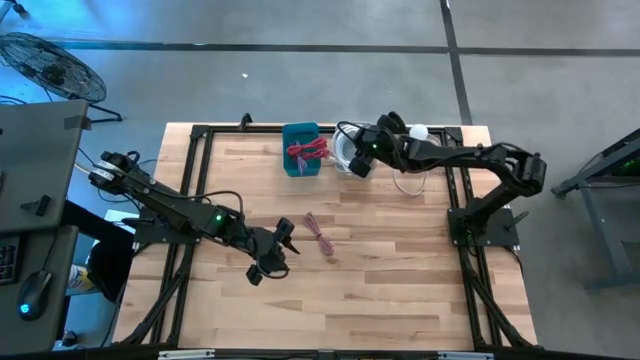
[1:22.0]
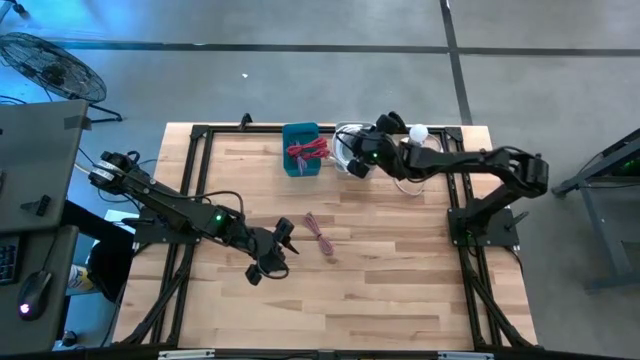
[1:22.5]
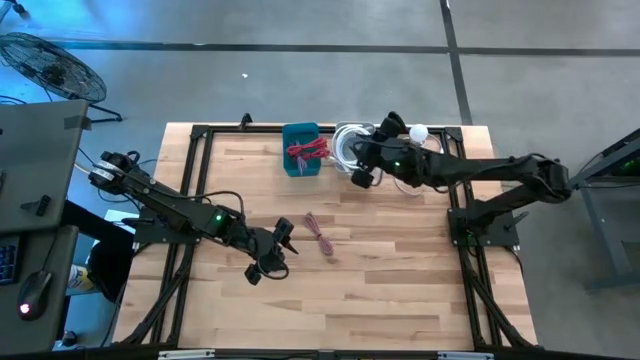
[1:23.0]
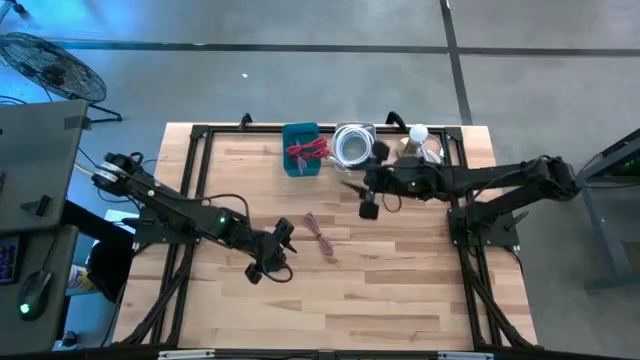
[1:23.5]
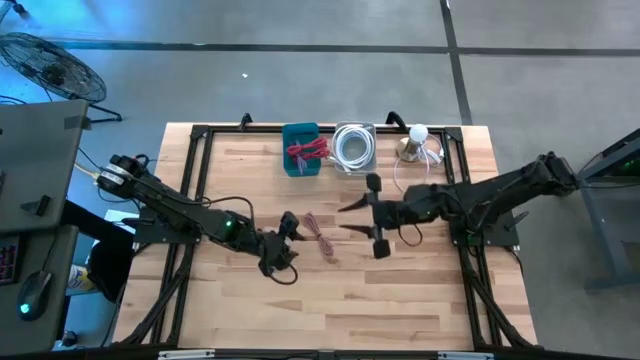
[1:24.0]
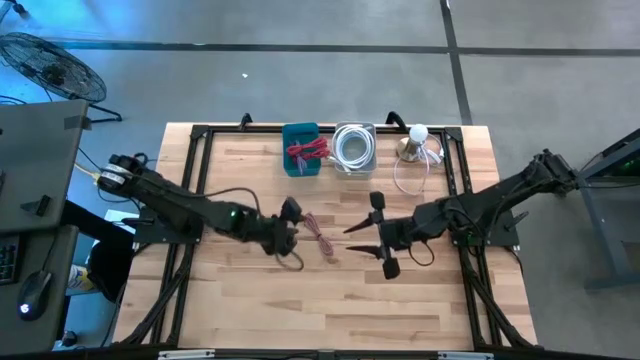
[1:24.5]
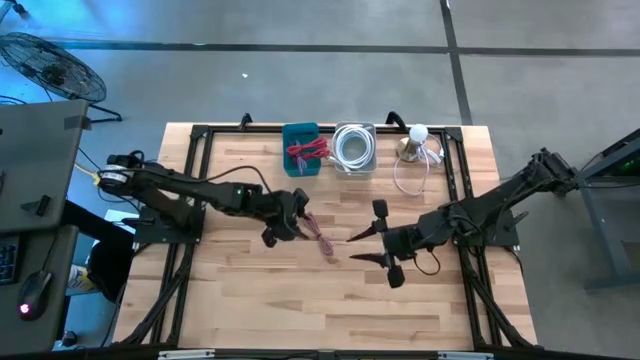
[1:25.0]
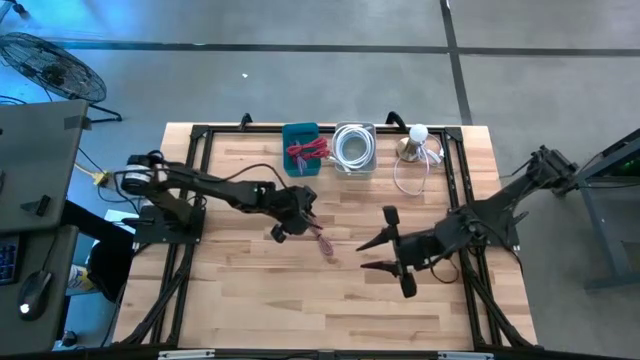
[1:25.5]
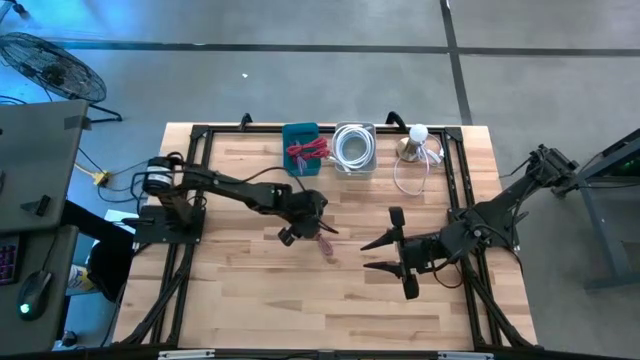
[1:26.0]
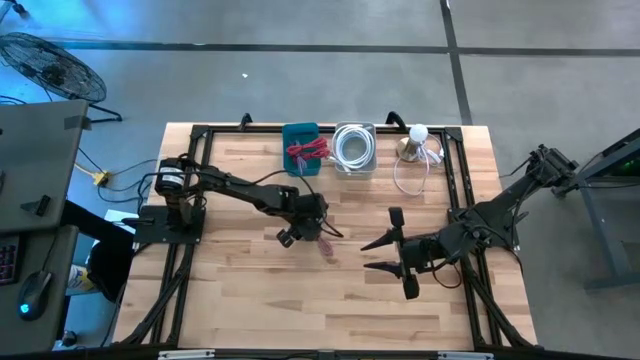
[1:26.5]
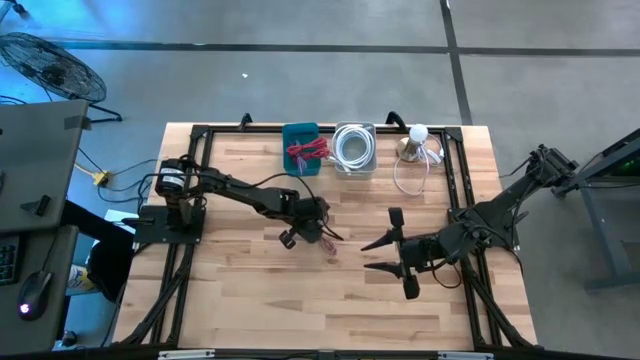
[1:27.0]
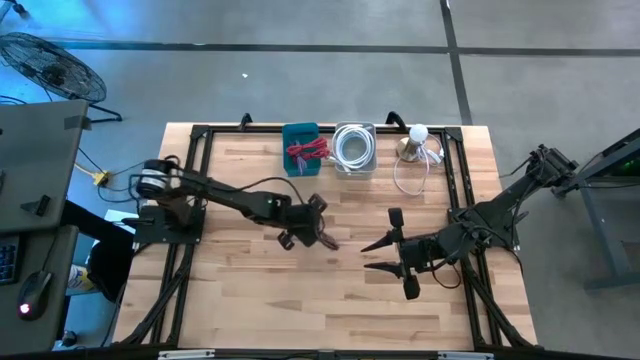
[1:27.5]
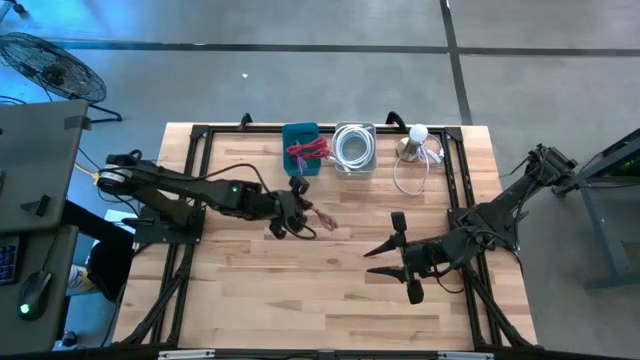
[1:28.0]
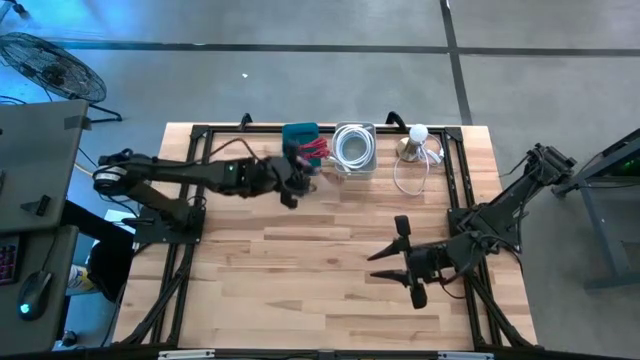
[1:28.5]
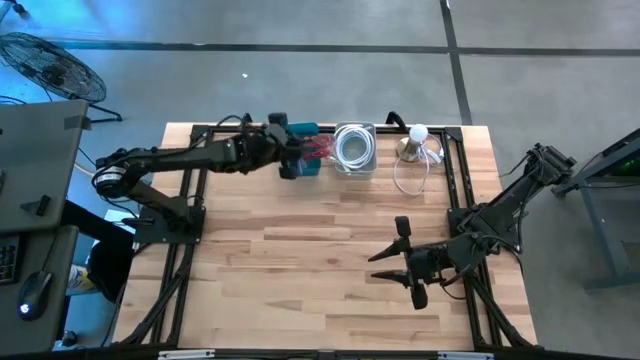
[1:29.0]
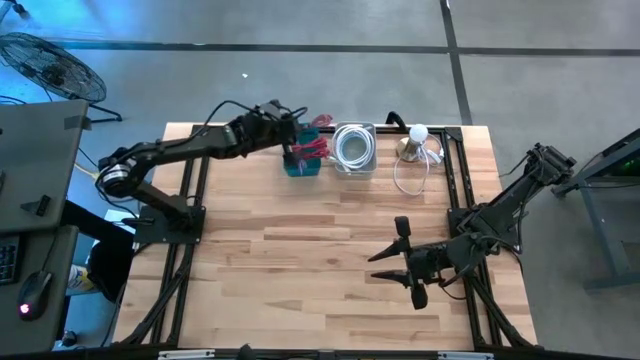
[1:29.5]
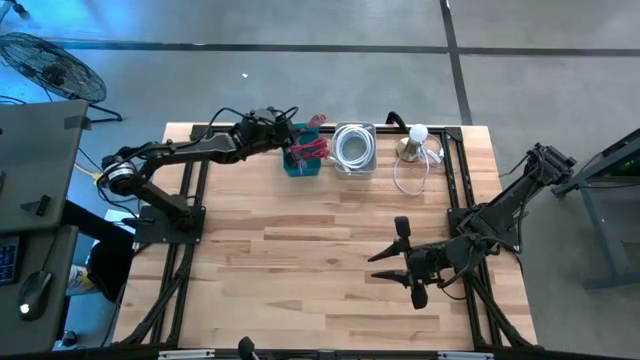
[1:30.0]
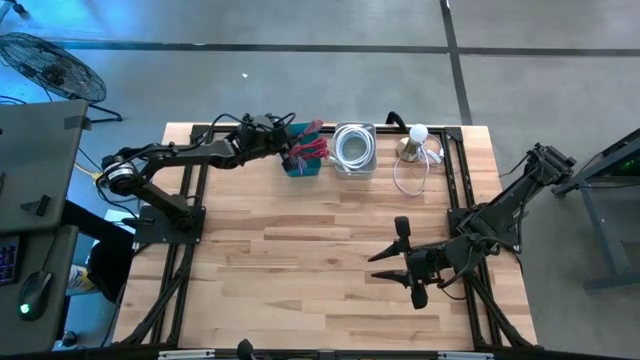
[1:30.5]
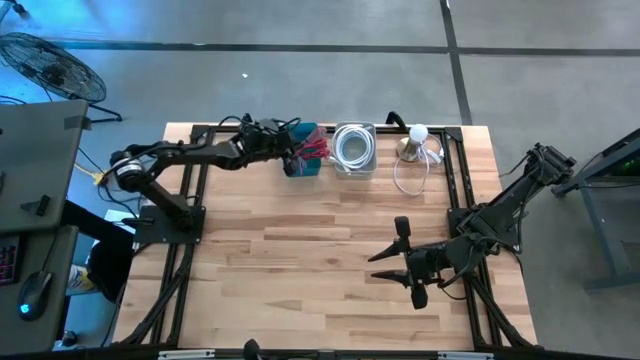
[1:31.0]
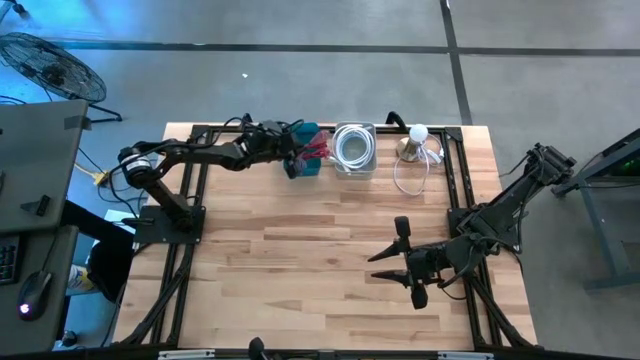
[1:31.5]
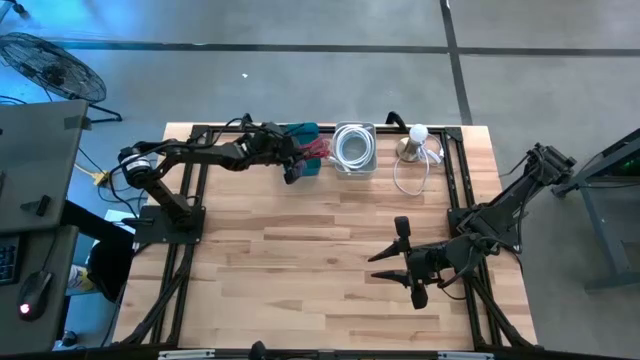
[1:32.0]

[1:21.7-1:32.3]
Task: Pick & Place USB Port
Put the pink charger cable into the blue bin

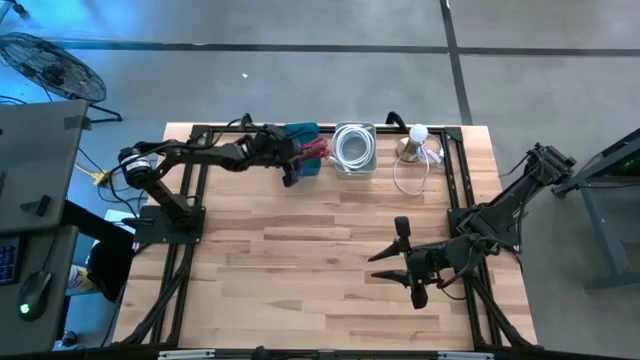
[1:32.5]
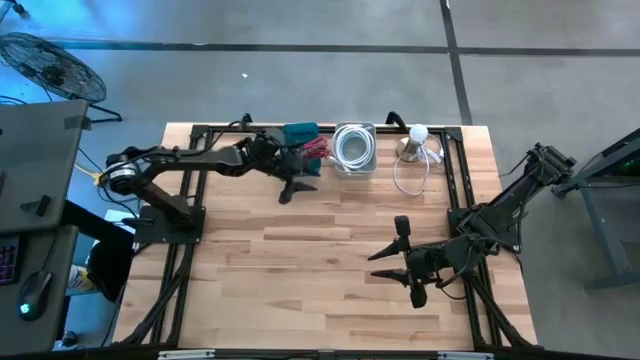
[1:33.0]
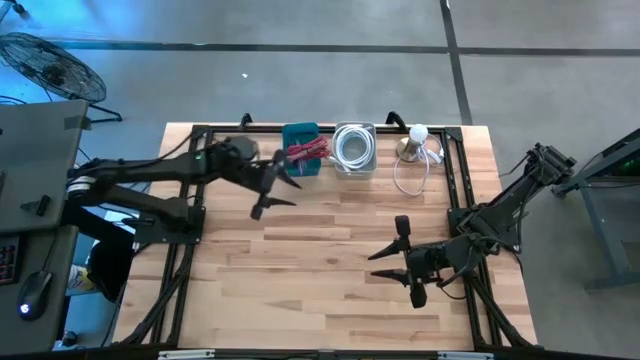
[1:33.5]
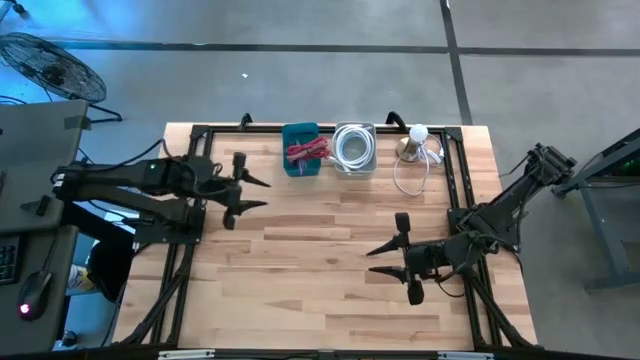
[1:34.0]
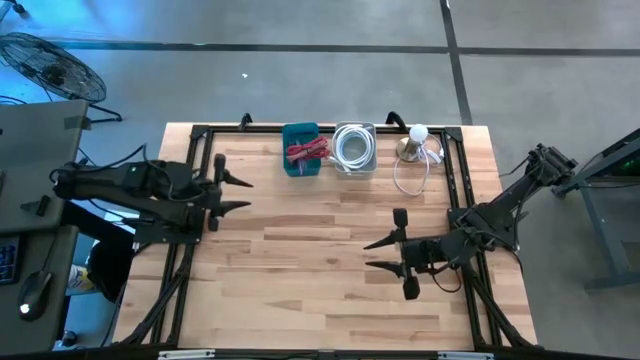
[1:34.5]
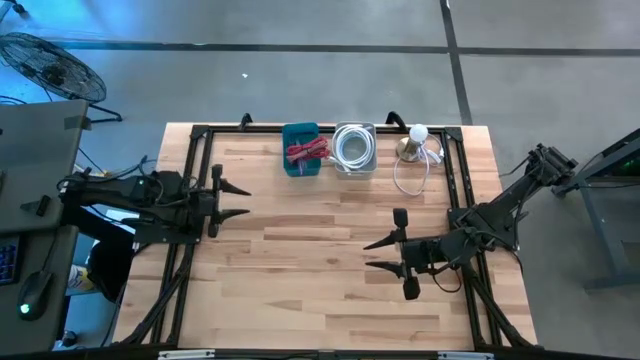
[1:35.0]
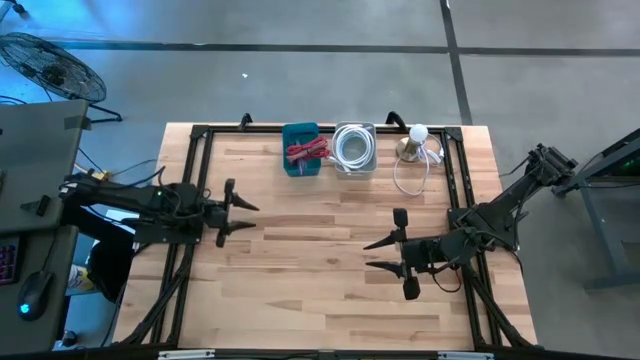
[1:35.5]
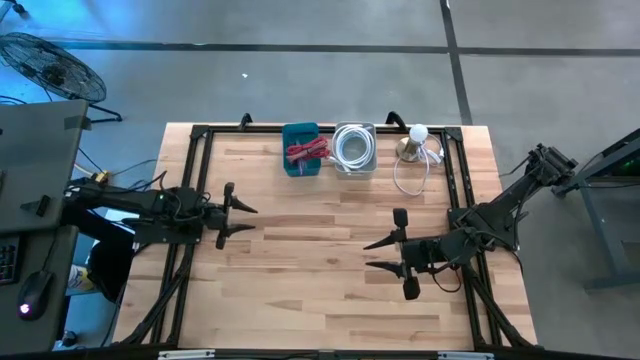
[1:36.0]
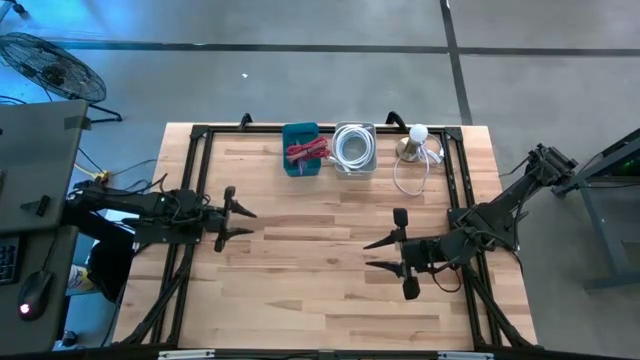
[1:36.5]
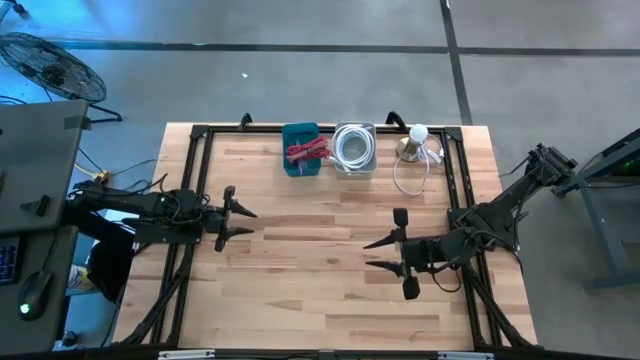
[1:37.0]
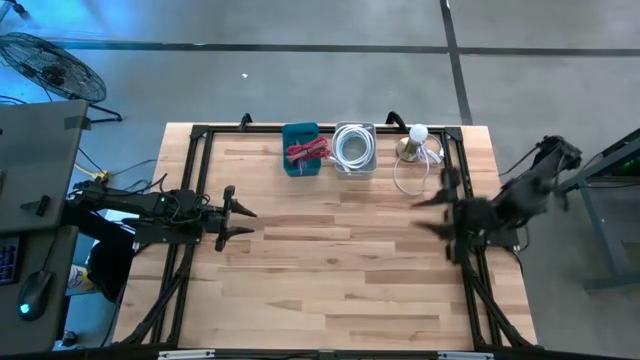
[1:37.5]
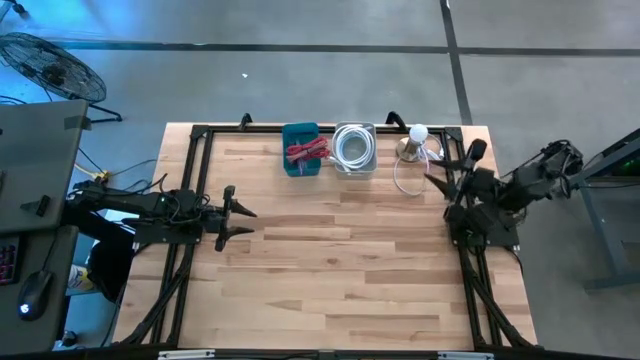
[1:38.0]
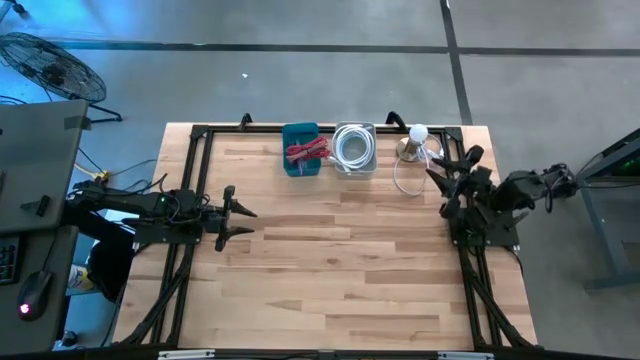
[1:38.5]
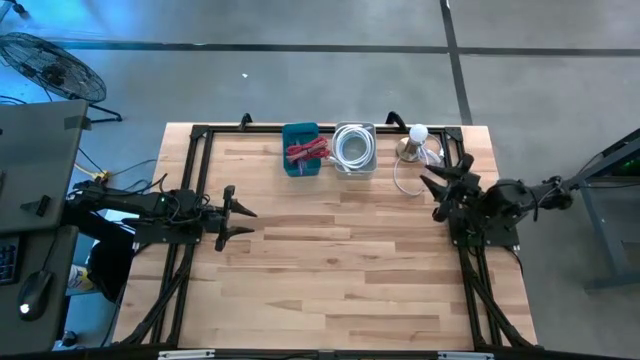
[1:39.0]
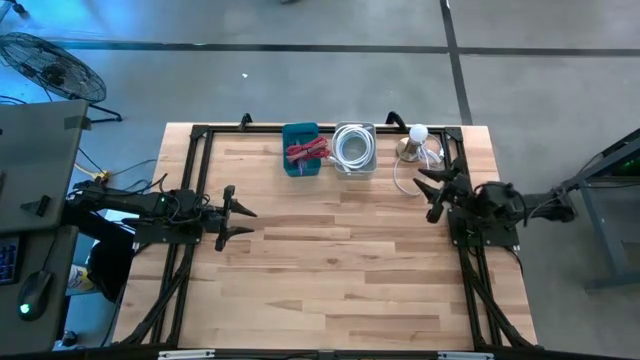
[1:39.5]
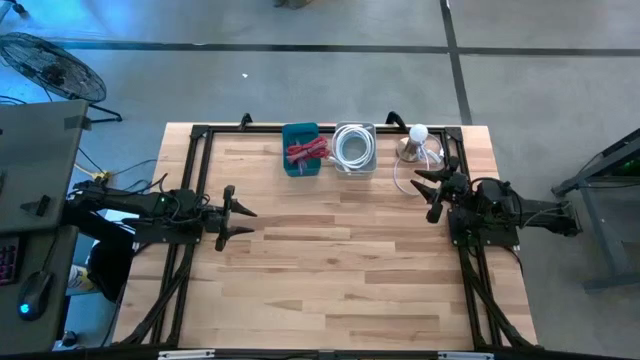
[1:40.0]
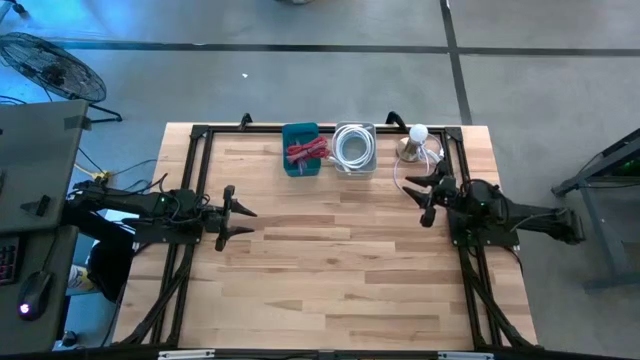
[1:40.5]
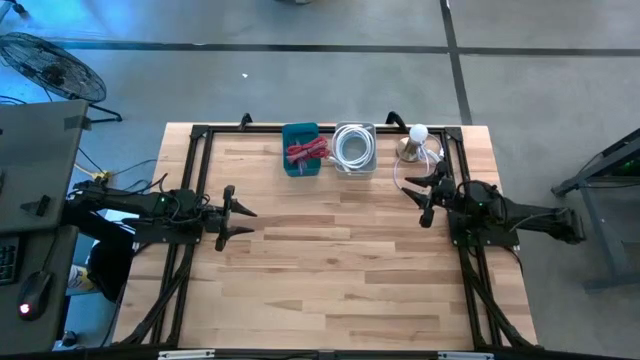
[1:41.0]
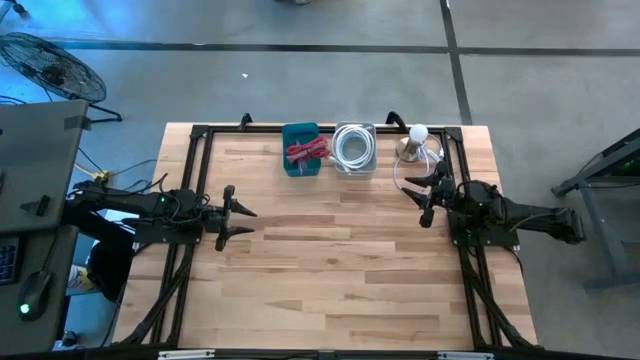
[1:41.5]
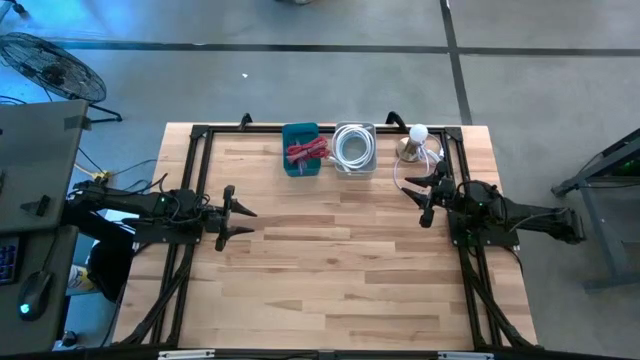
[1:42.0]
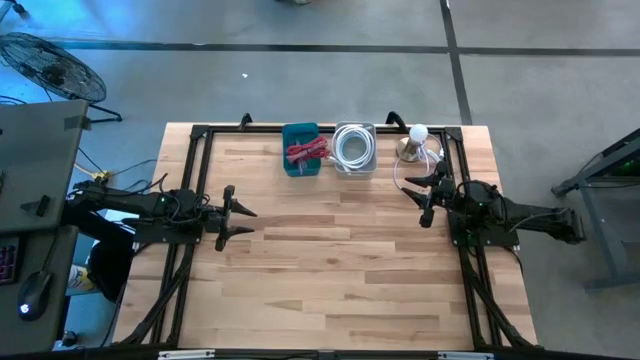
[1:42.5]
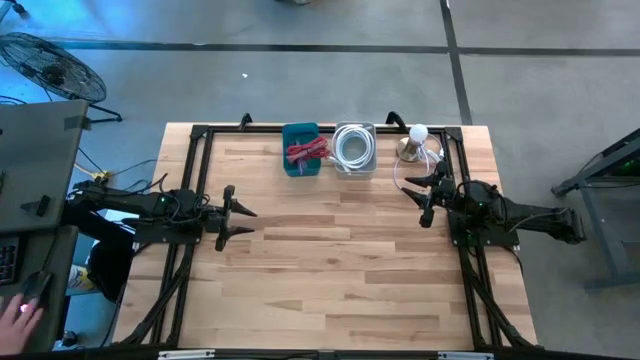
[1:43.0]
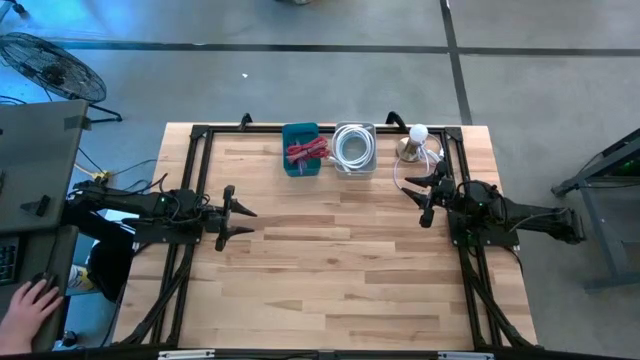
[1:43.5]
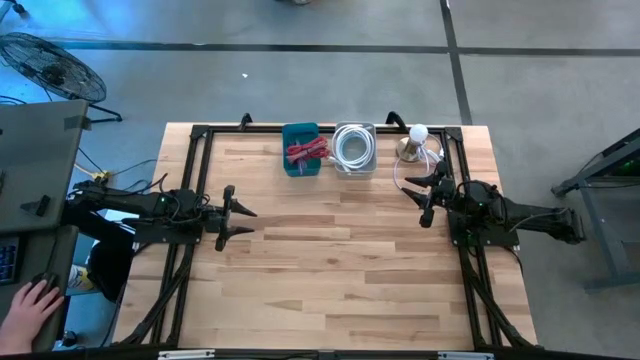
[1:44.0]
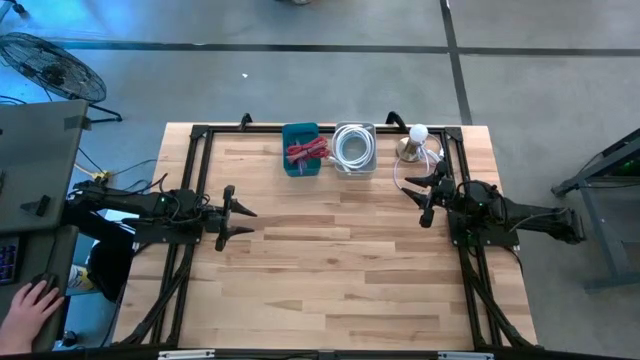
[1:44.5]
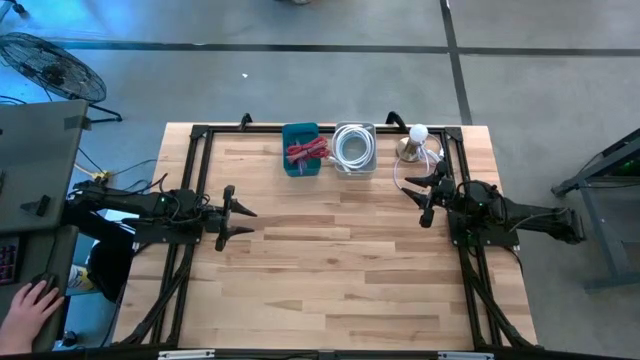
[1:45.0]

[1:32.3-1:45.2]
Return to Home Position
